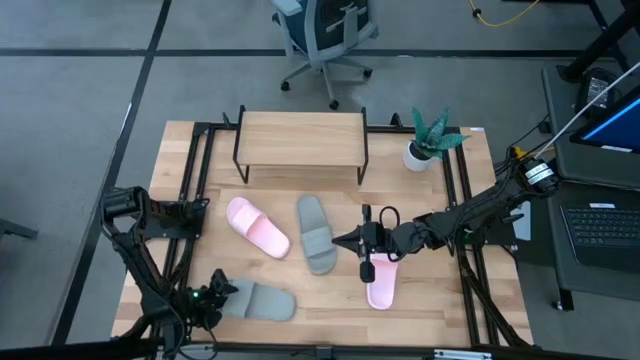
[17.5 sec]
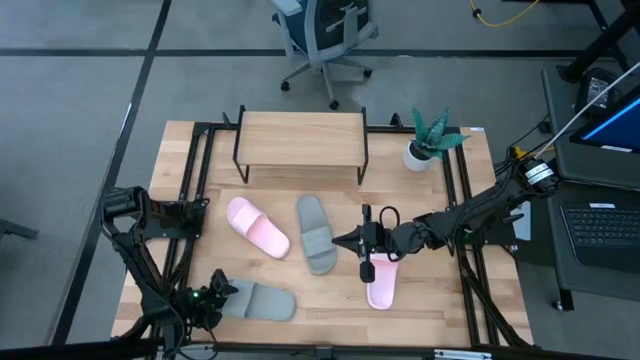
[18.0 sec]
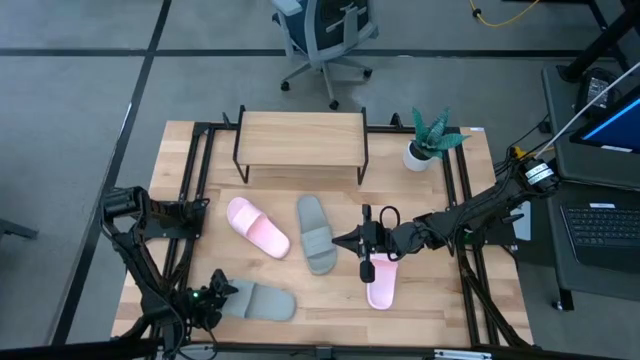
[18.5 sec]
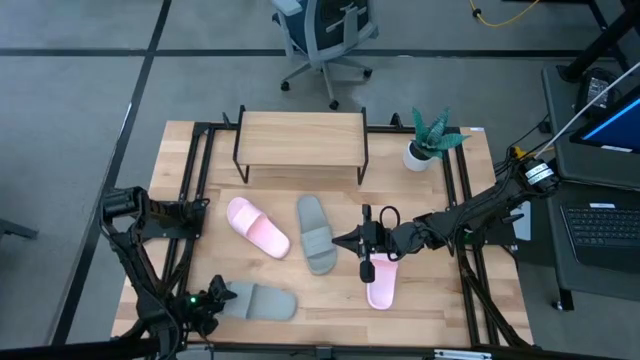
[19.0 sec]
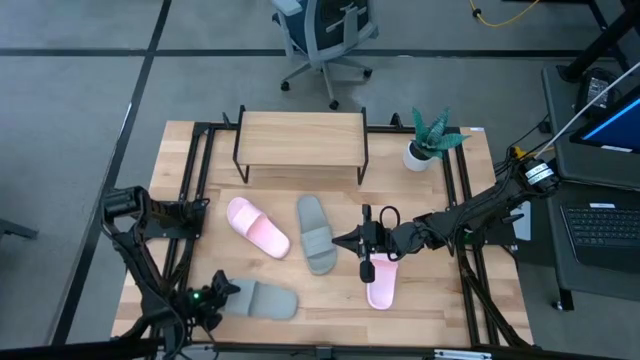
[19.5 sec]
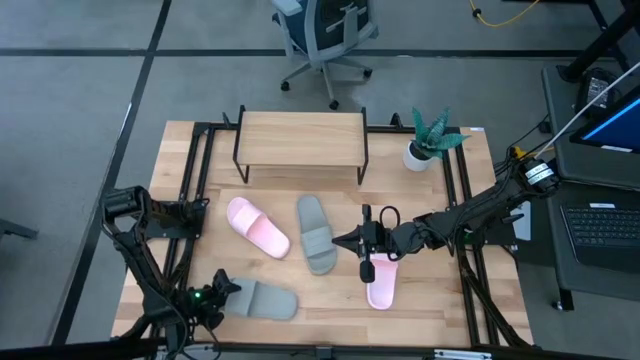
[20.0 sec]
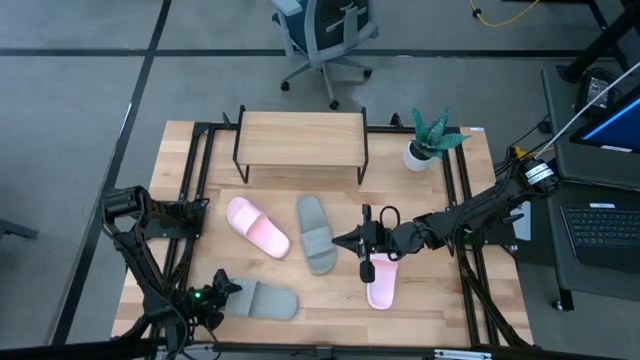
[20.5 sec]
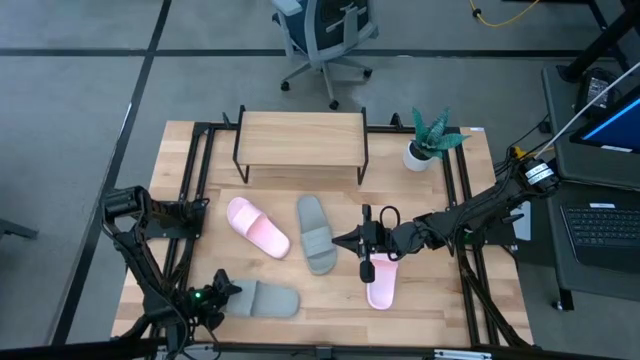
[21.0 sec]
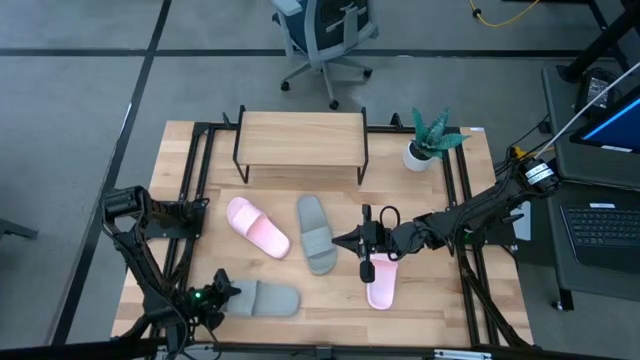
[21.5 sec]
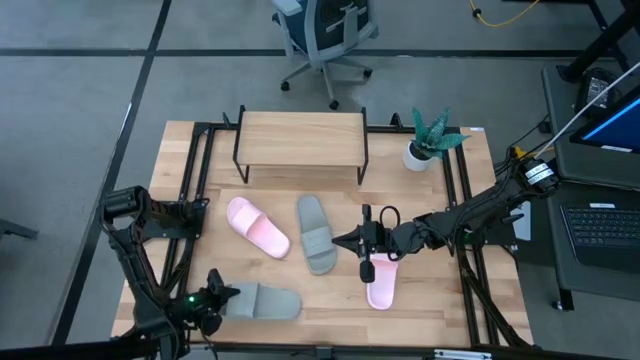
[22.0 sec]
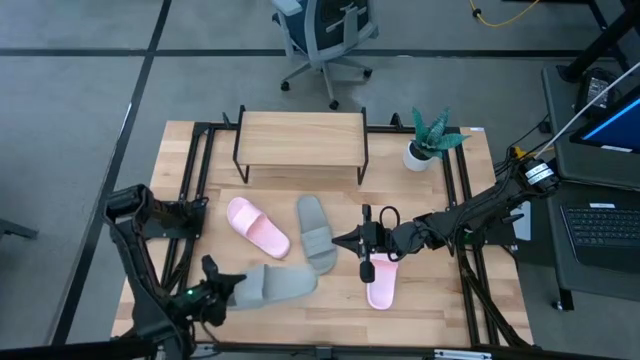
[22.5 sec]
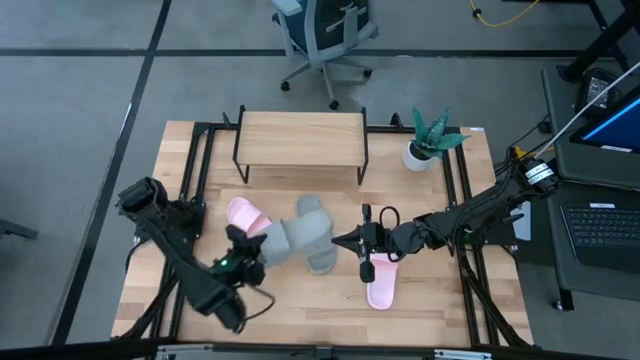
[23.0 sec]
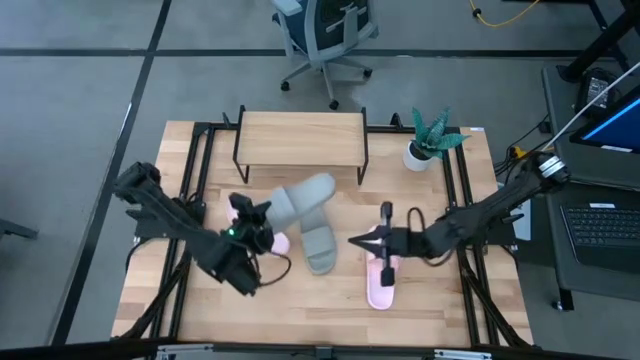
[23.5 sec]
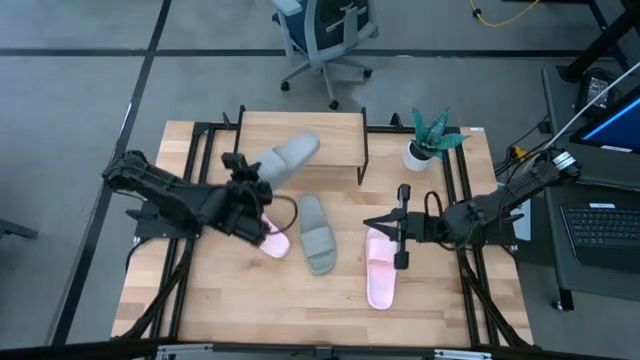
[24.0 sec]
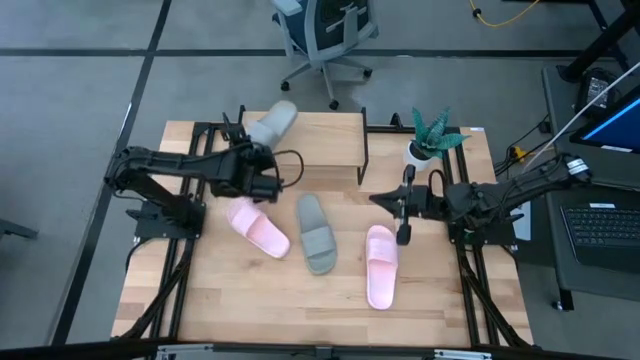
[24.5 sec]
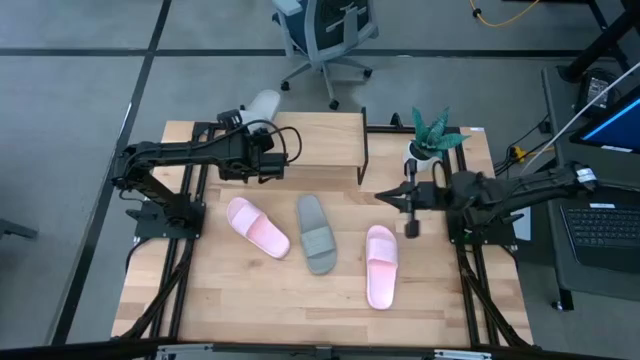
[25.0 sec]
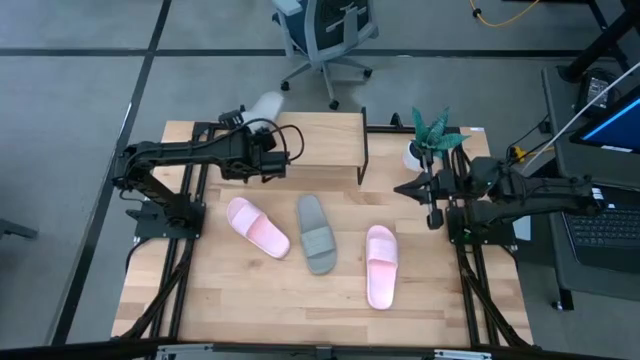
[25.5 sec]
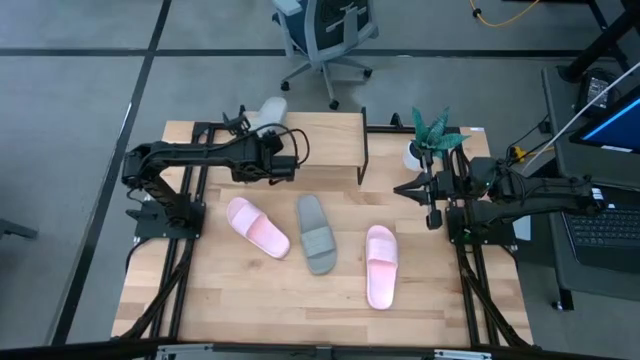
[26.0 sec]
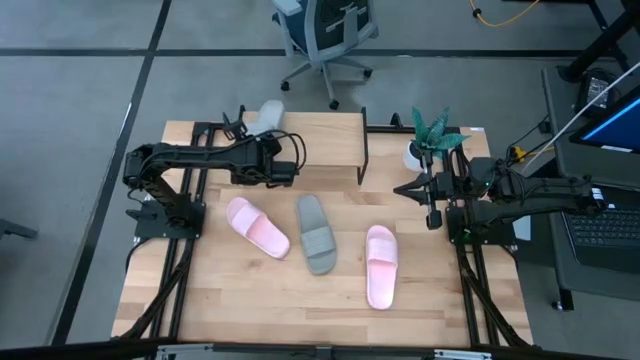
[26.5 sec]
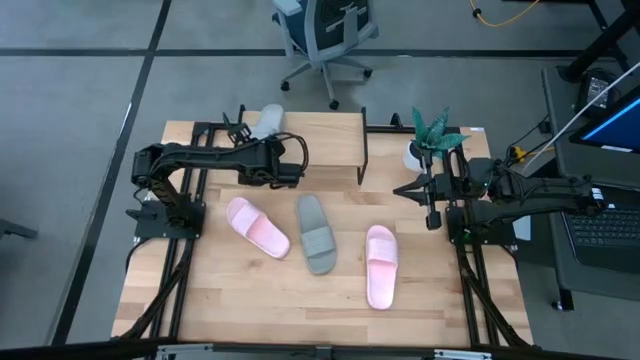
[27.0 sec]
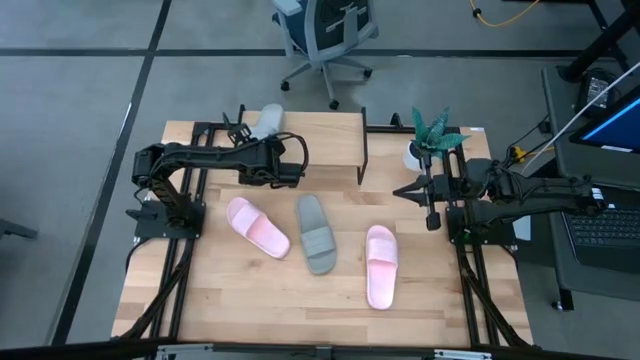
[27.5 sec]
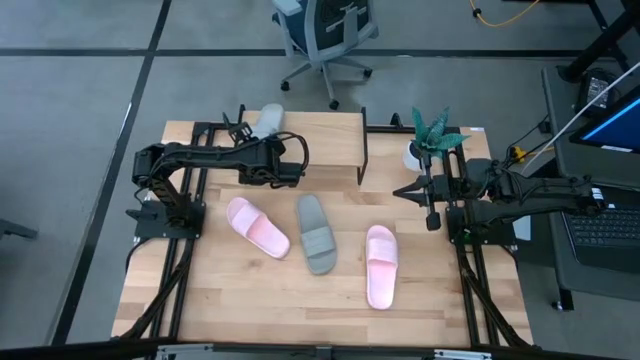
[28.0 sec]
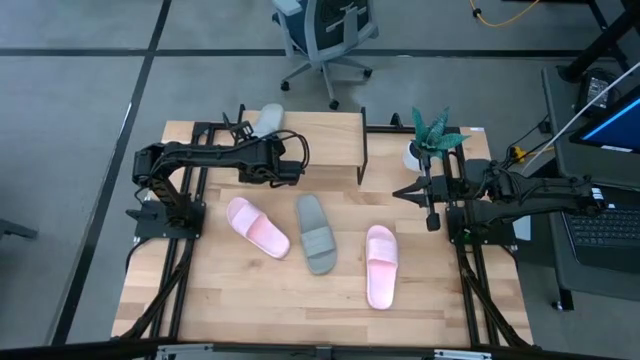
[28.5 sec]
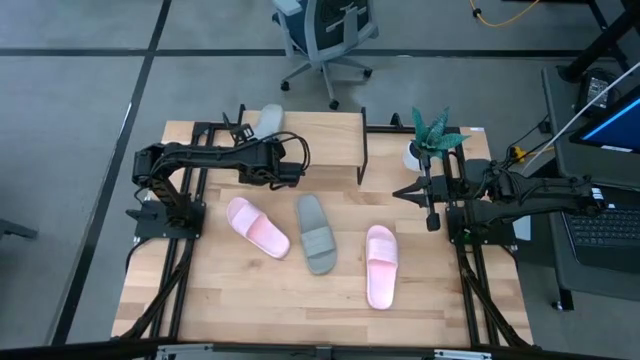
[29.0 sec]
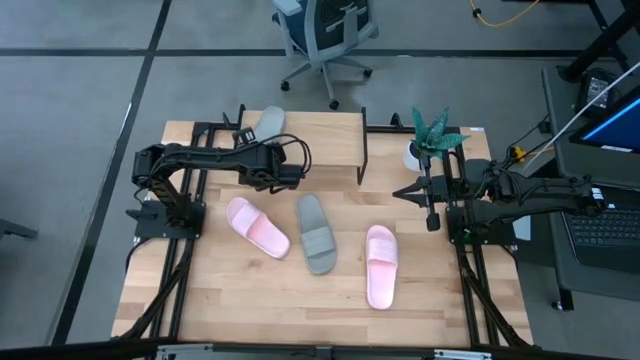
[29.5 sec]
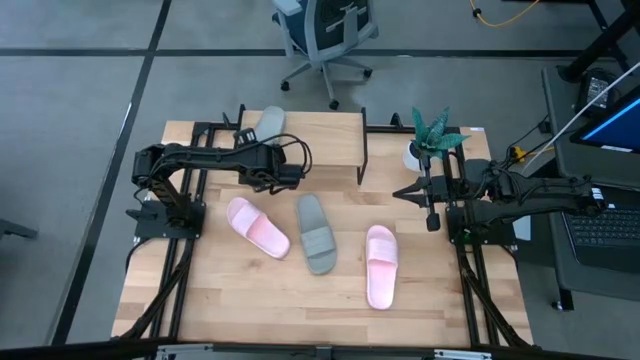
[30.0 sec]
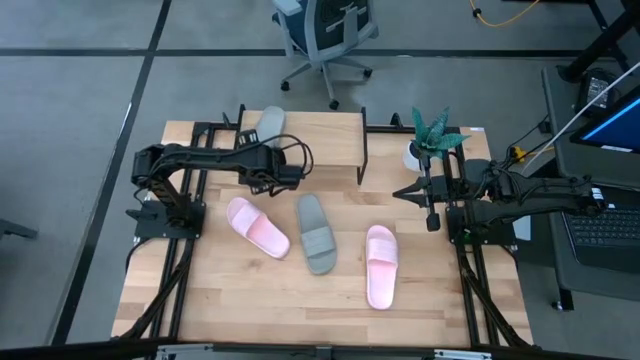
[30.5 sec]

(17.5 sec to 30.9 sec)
Task: Pick and place slides into the shelf
Put the bottom gray slipper on the shelf
